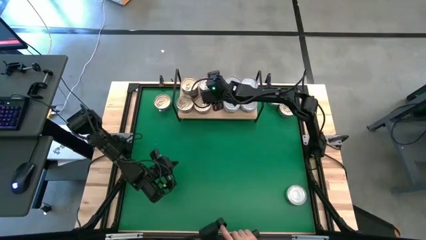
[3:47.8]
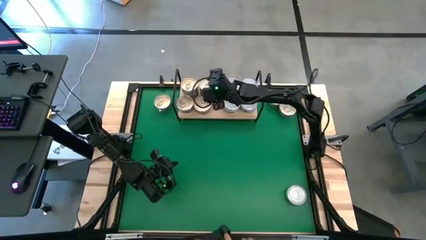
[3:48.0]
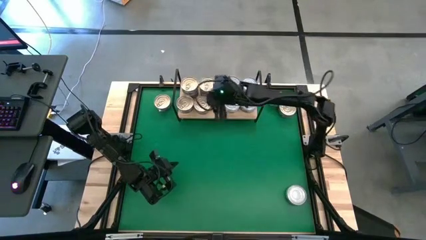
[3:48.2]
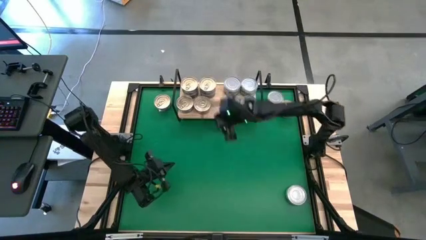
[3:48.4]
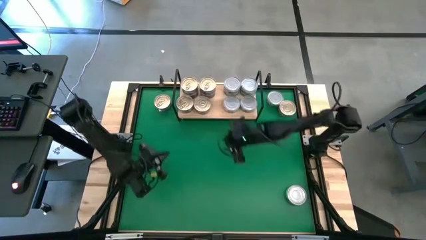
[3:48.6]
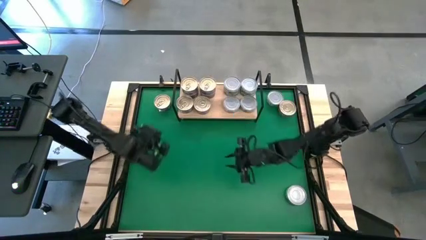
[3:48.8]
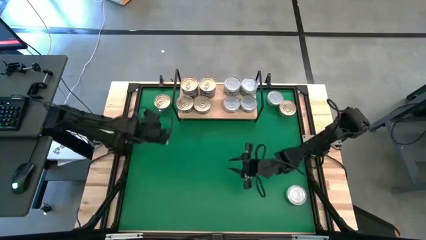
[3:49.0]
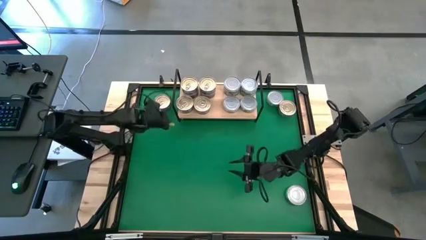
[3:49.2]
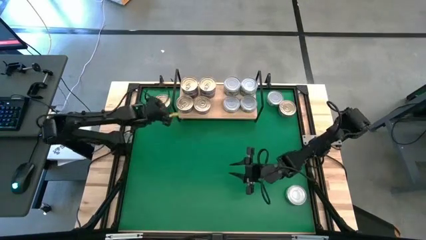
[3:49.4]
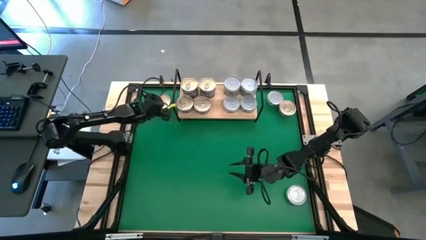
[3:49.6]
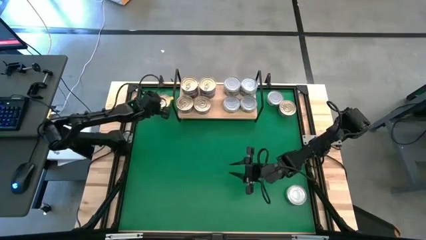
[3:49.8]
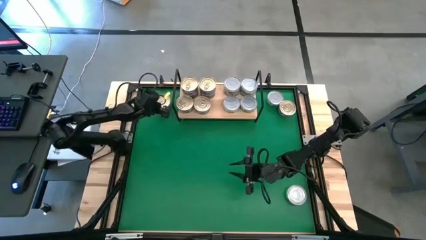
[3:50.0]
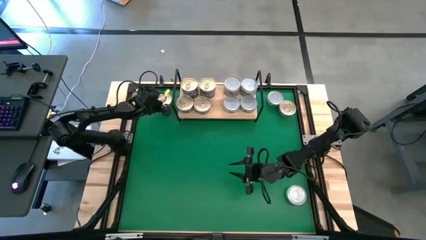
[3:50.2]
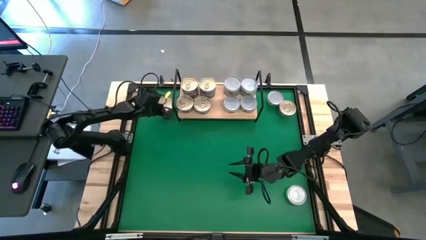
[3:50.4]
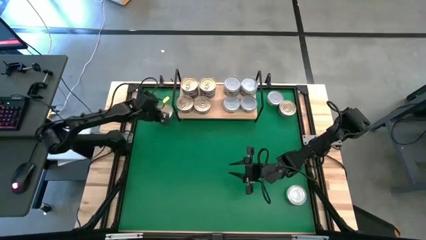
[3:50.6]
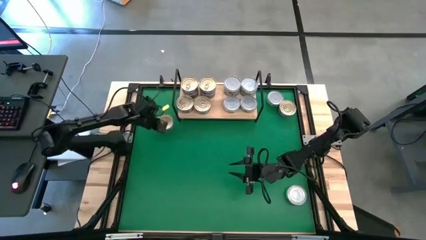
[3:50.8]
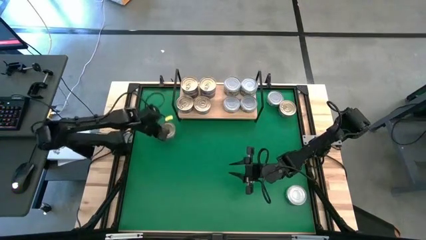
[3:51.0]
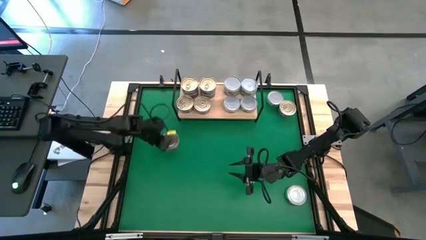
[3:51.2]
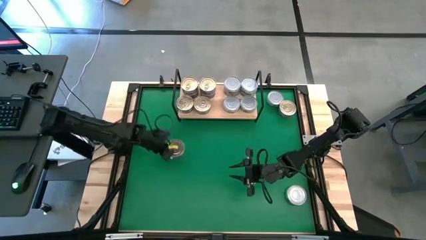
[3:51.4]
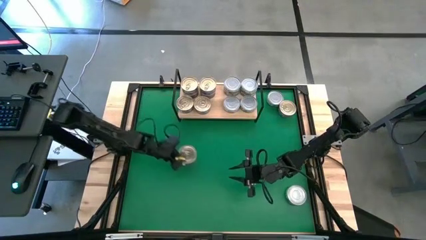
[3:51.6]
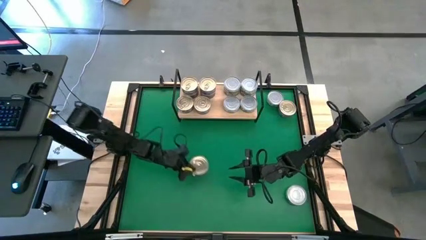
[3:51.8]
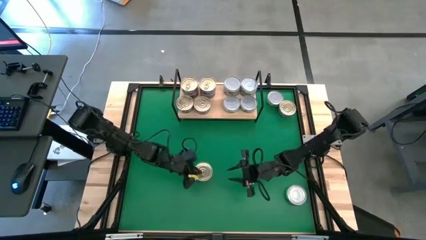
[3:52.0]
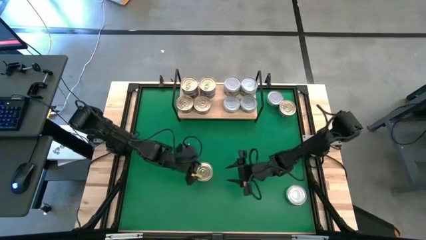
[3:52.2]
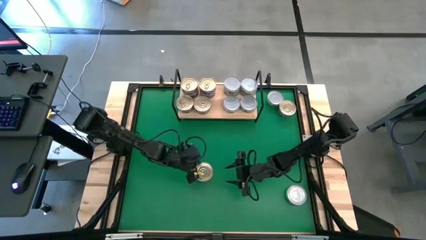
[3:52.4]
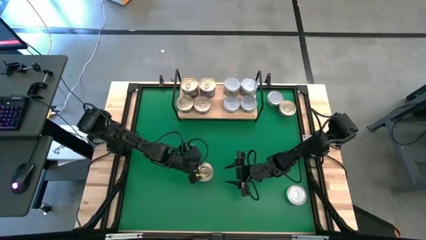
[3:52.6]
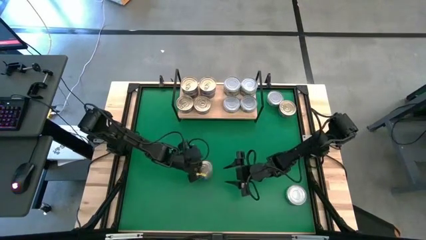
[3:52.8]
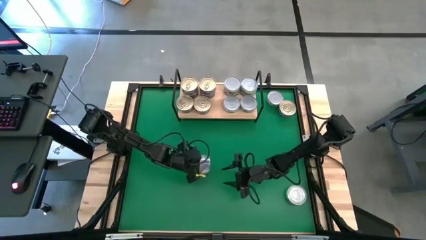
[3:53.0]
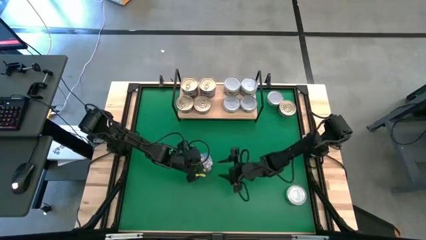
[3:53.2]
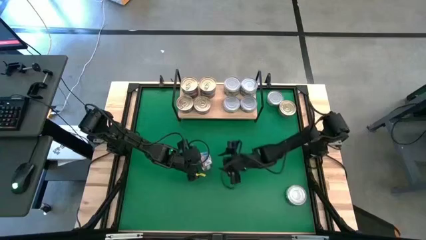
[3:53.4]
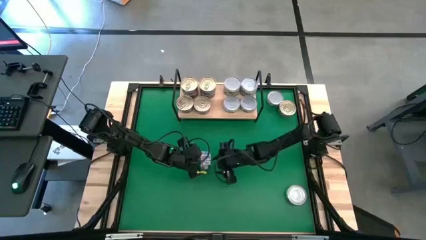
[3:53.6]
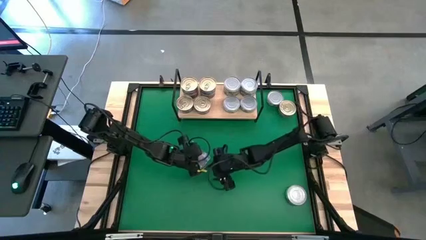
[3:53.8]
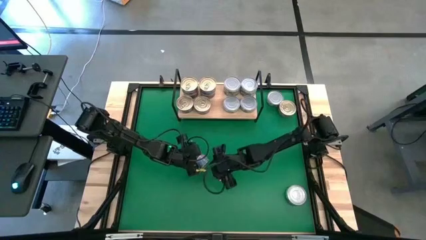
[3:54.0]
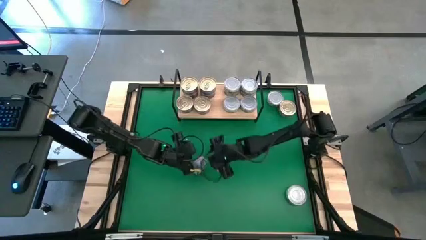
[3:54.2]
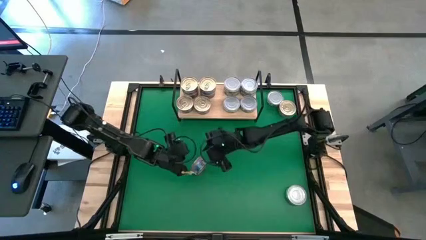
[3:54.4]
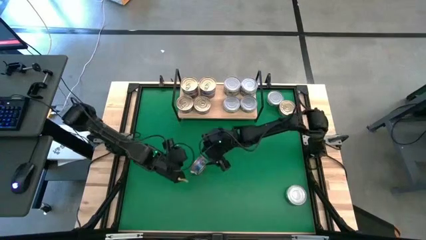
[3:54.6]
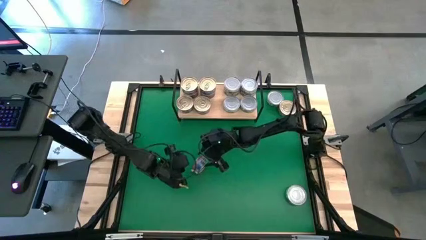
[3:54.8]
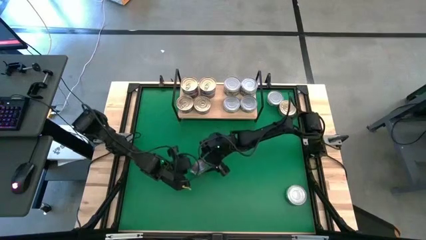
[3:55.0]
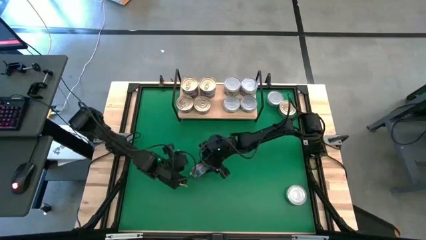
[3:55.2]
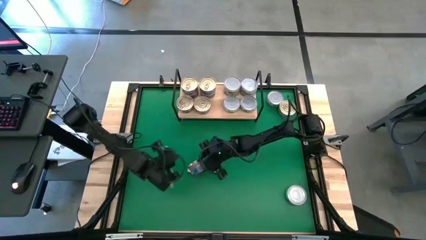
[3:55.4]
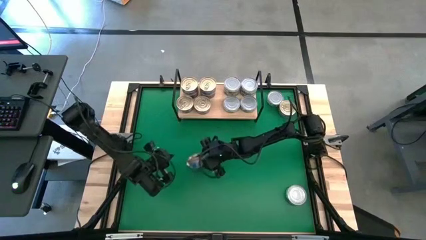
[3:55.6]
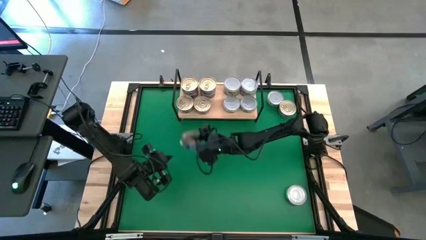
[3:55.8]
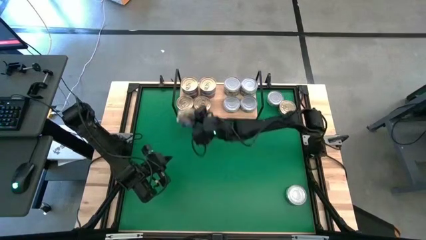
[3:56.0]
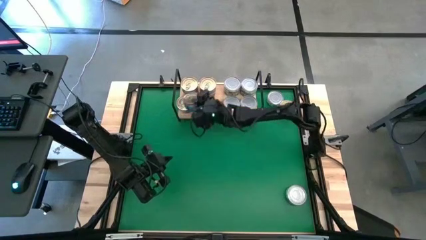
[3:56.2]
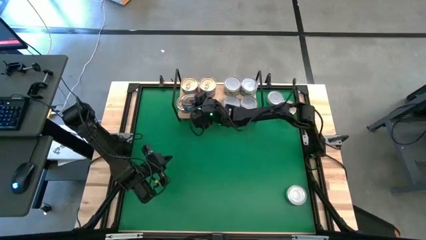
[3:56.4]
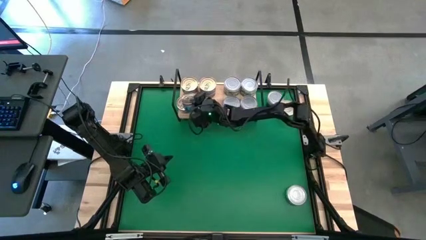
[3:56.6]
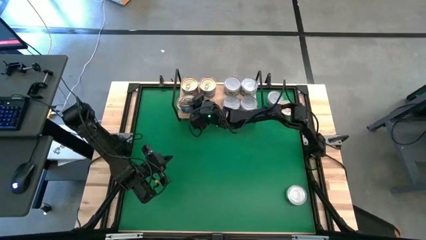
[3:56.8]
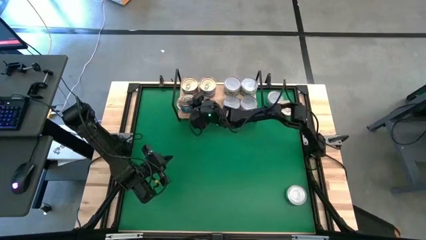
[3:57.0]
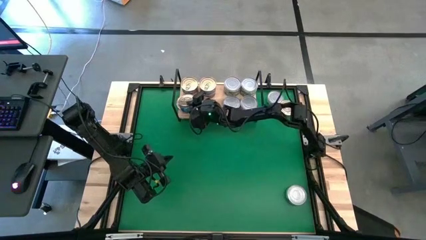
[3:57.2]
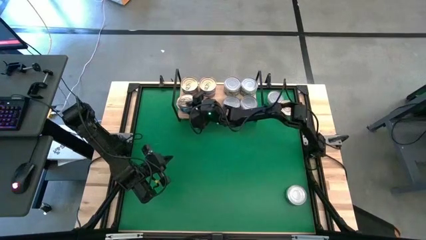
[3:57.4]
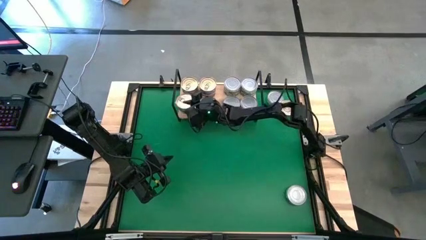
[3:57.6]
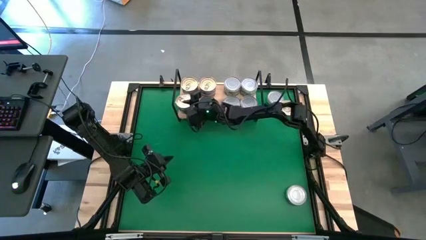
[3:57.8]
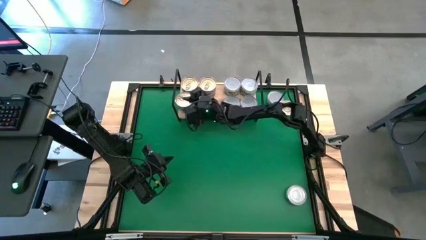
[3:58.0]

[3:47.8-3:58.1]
Task: Stack canned seafood by type on shelf
Stack the blue pink tuna can on top of the other blue pink tuna can on the shelf

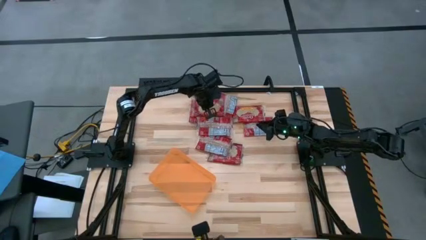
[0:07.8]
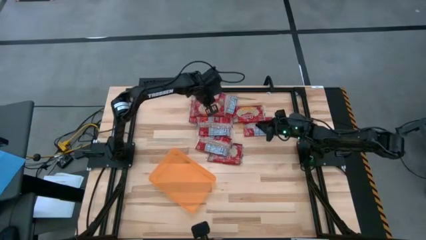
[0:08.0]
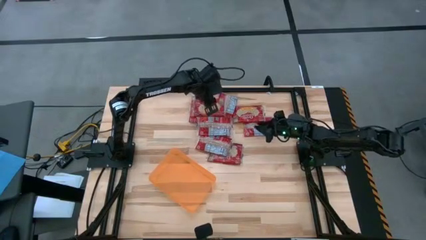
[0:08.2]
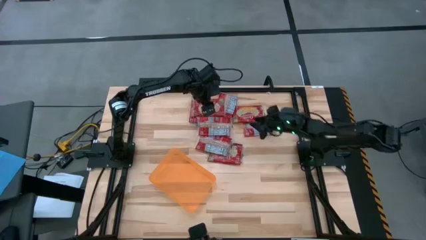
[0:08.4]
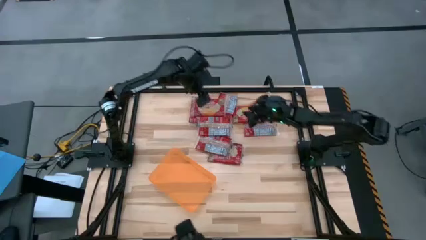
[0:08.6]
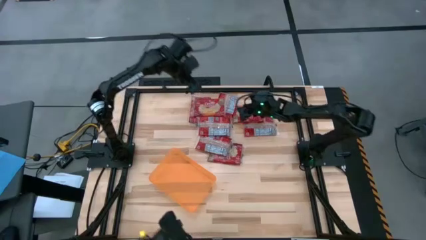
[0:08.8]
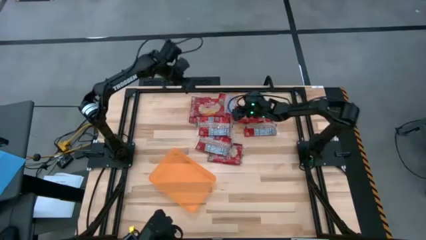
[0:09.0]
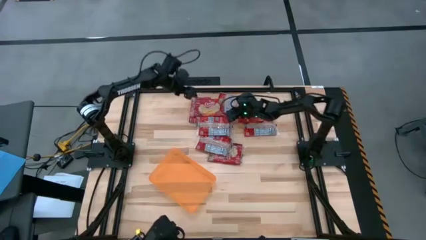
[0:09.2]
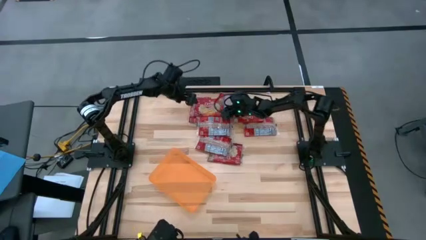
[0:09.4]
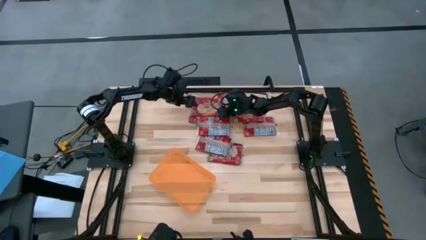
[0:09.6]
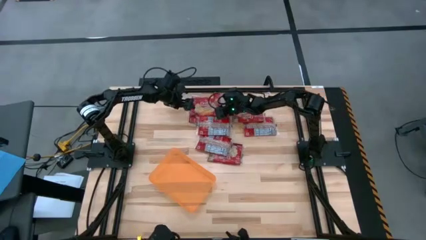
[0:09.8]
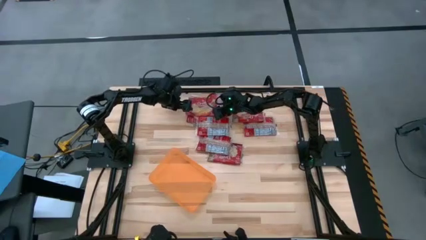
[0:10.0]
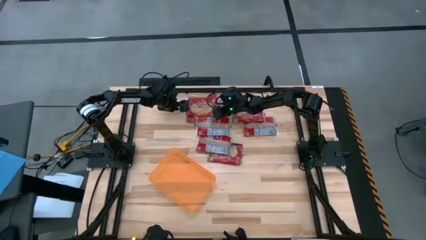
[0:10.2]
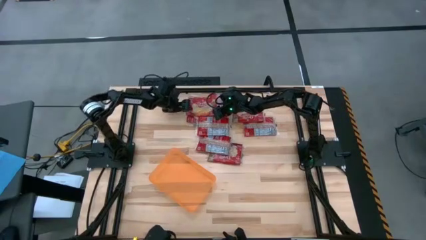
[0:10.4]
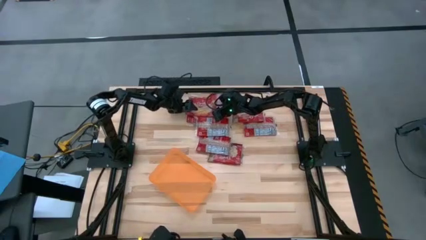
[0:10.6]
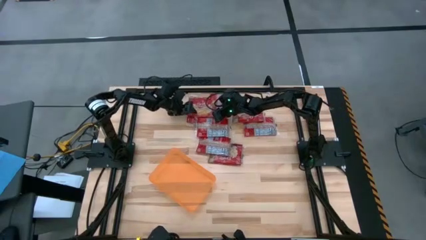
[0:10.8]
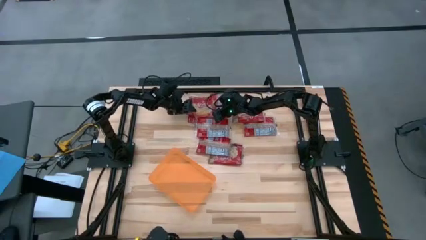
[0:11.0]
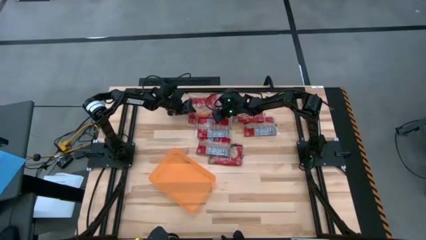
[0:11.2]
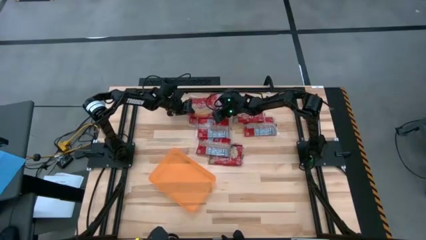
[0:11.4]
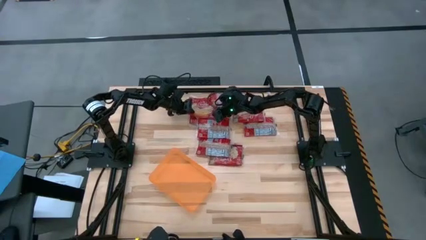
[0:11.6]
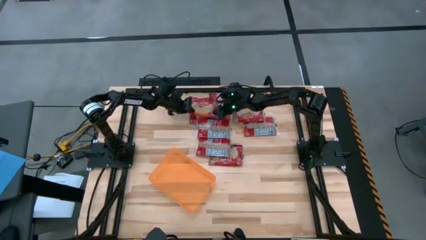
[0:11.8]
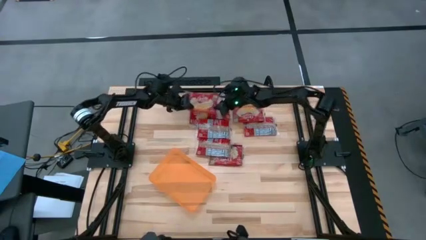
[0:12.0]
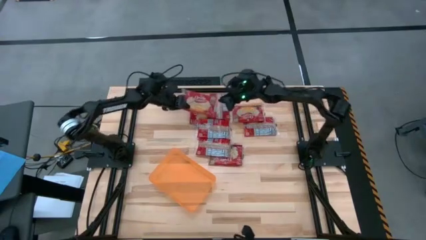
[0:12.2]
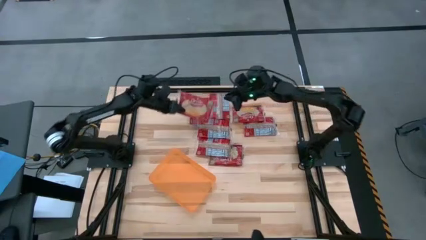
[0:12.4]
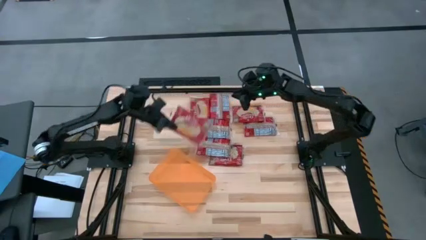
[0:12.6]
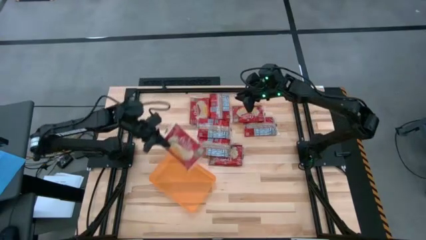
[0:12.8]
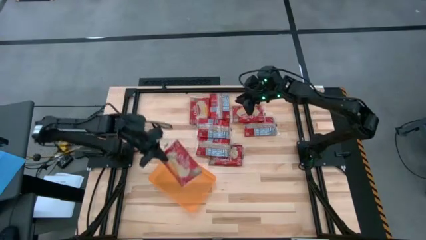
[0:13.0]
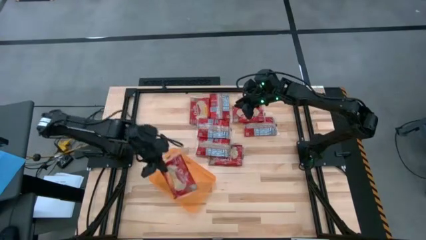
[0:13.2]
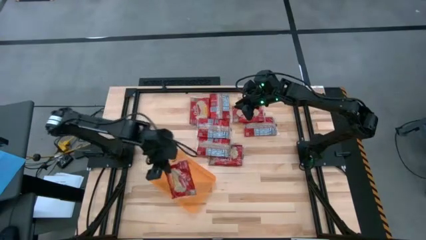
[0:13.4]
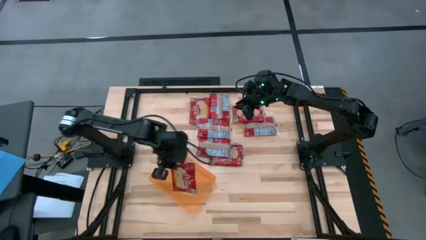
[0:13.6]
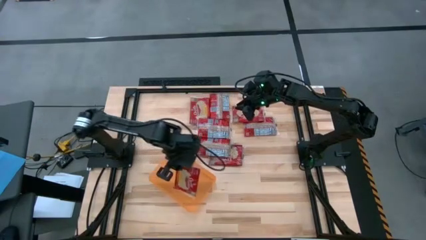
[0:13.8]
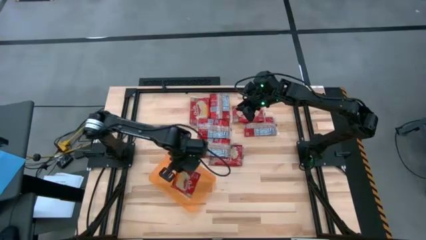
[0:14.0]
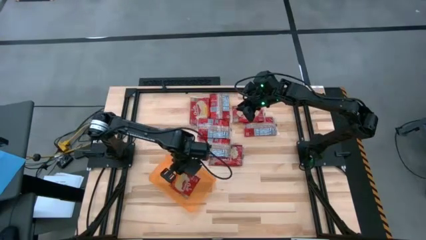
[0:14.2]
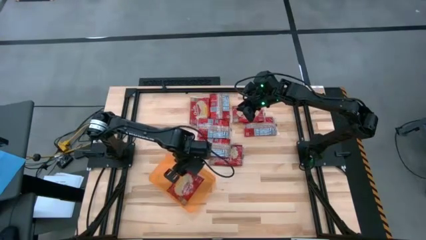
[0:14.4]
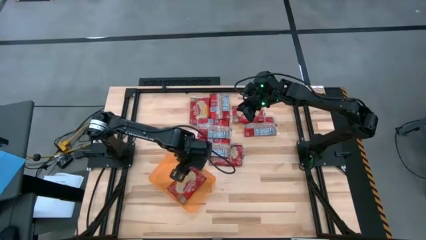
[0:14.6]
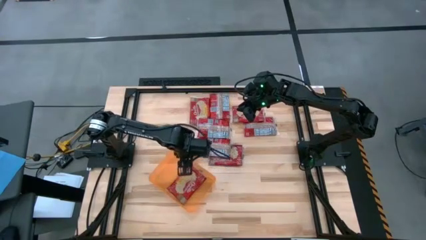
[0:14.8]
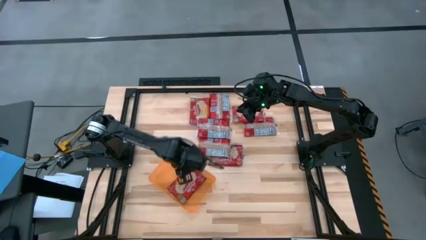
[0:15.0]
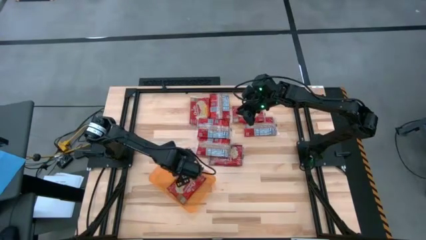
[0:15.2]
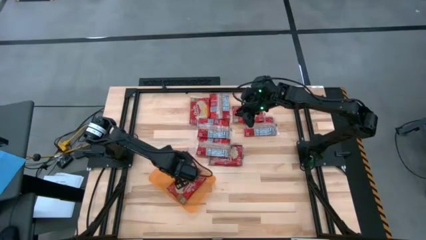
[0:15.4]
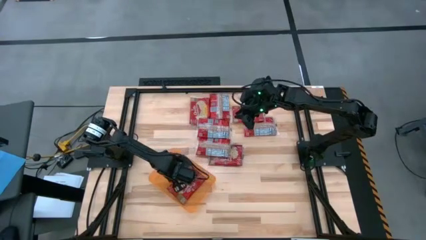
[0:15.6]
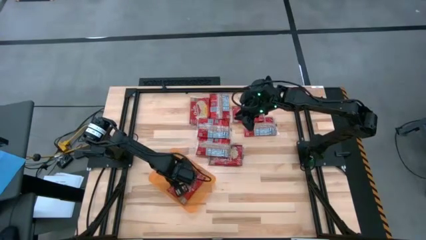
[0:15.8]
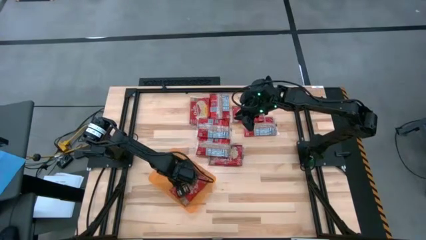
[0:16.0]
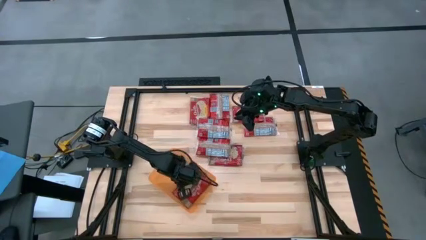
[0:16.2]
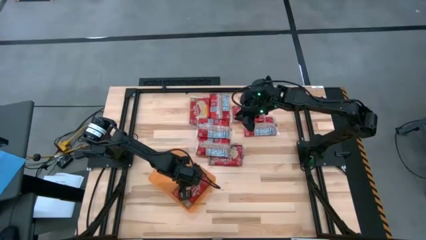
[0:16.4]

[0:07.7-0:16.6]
Task: Sort popcorn bags into baskets
Put the popcorn bag into the orange bin
